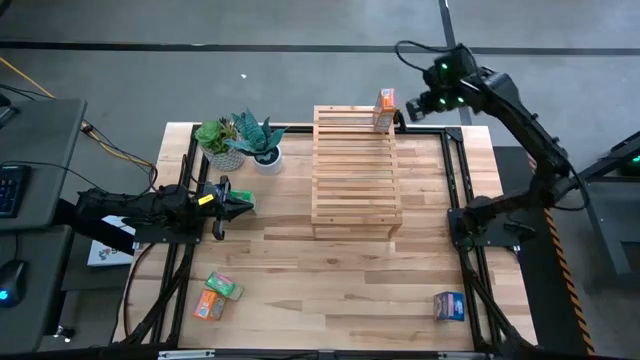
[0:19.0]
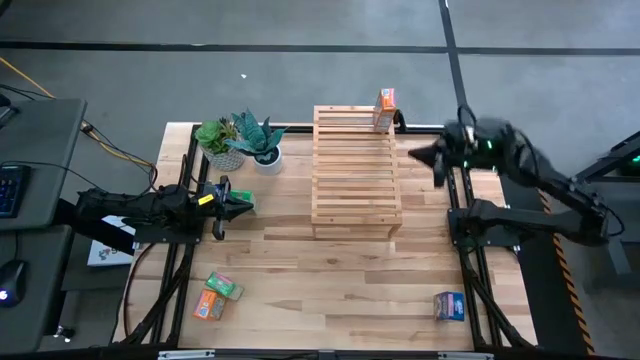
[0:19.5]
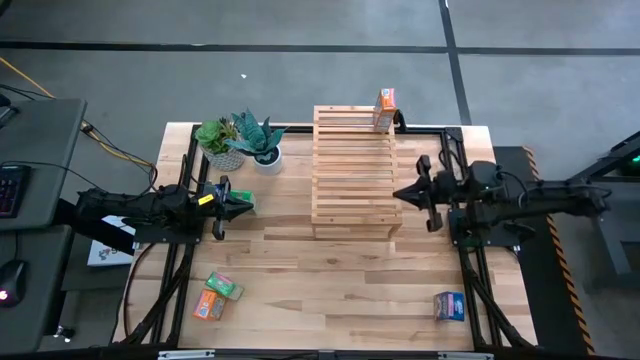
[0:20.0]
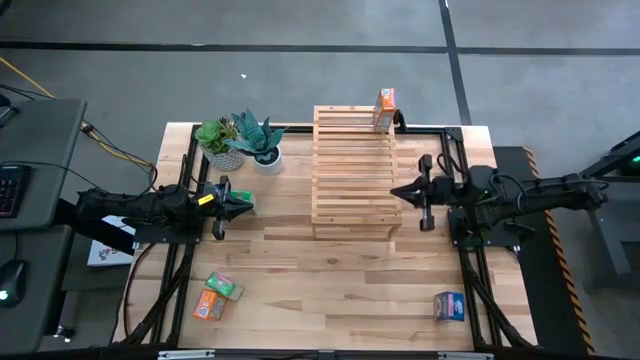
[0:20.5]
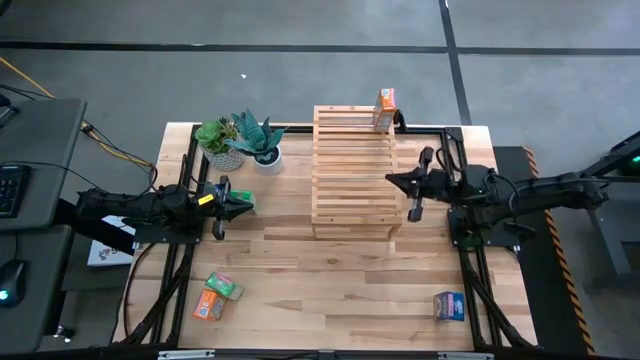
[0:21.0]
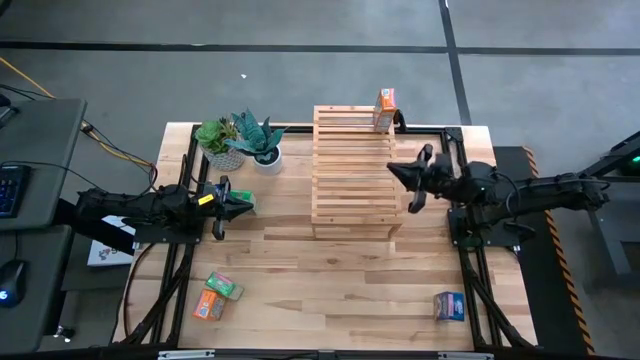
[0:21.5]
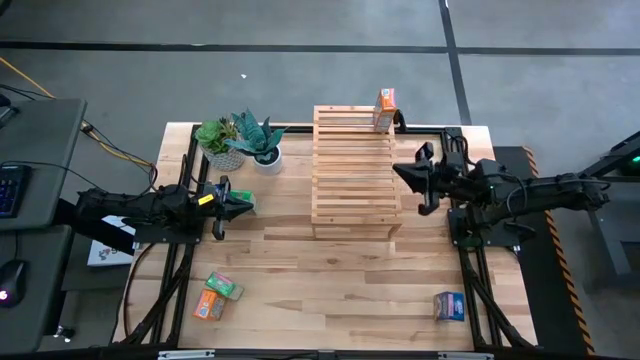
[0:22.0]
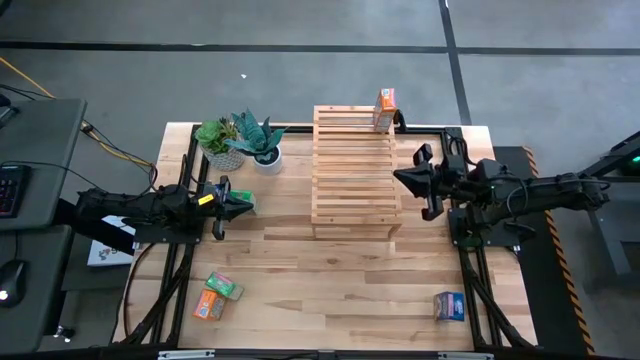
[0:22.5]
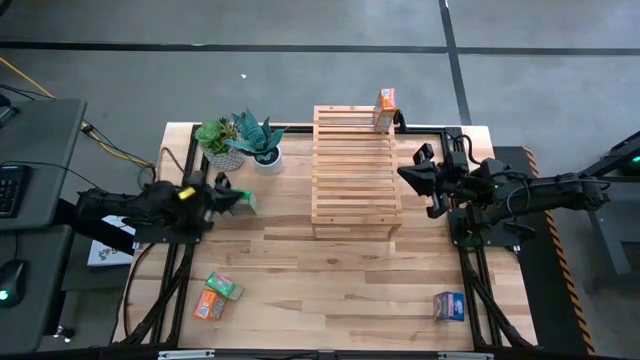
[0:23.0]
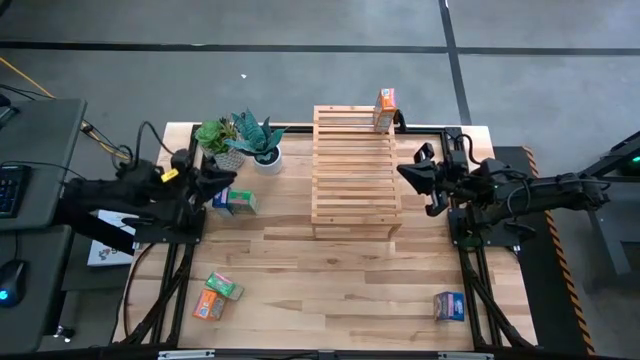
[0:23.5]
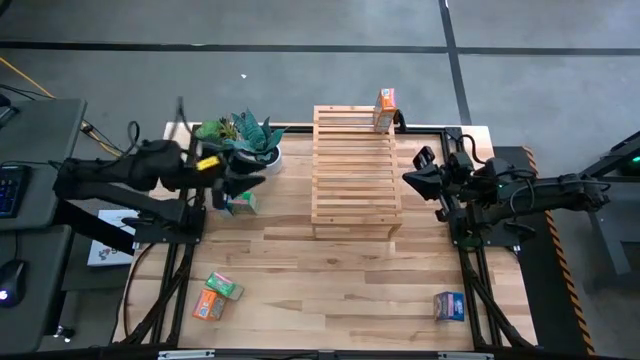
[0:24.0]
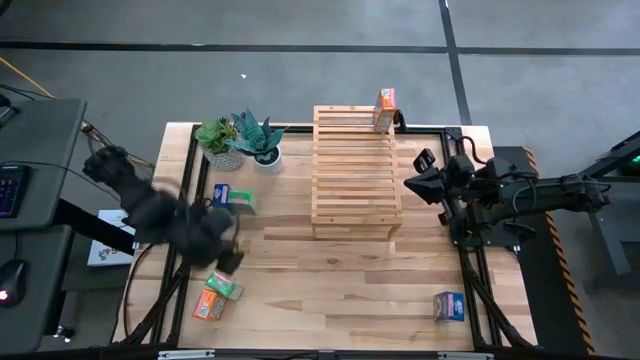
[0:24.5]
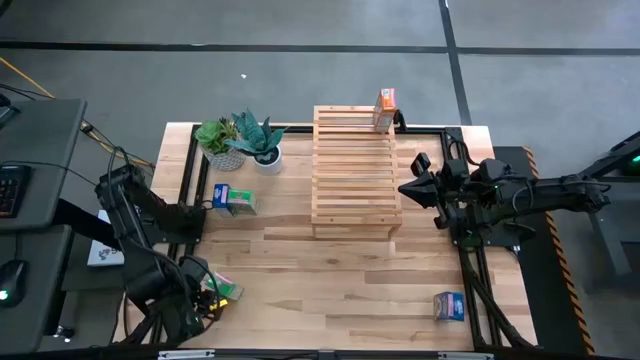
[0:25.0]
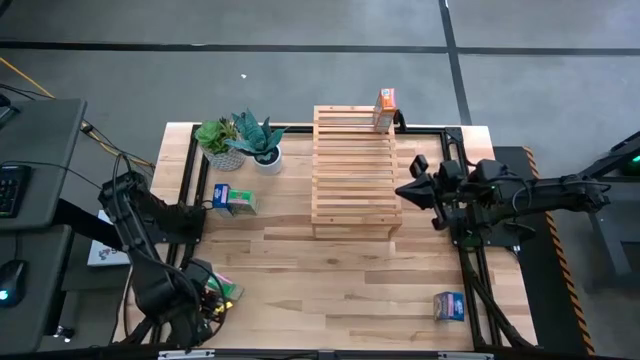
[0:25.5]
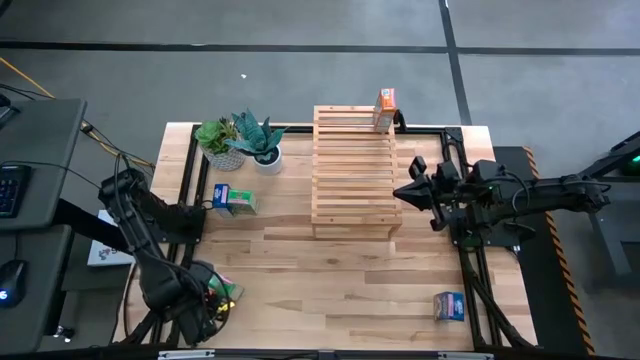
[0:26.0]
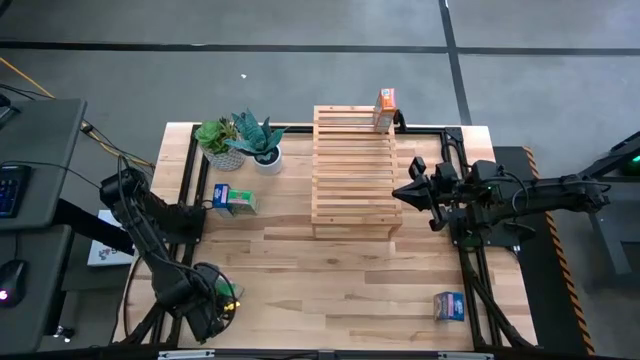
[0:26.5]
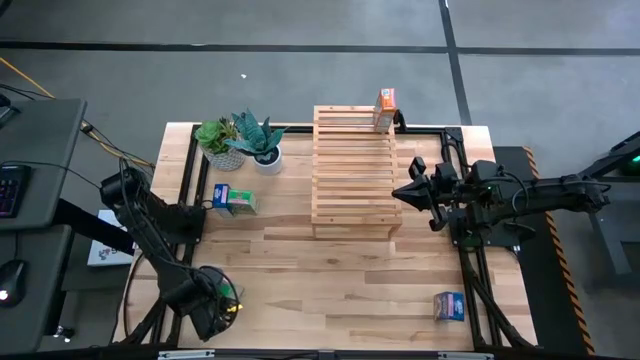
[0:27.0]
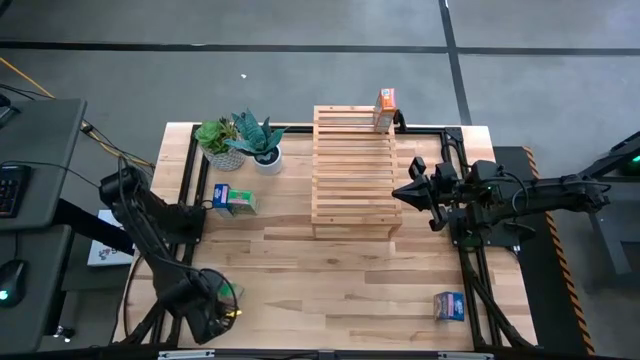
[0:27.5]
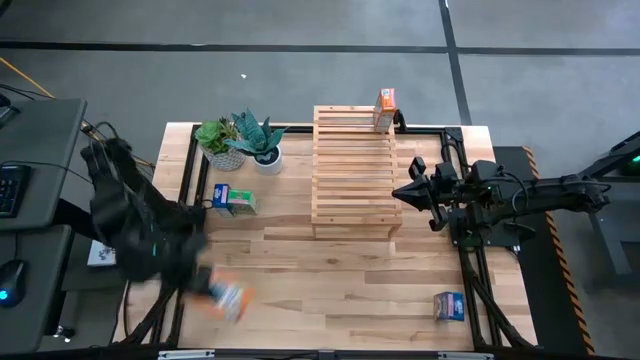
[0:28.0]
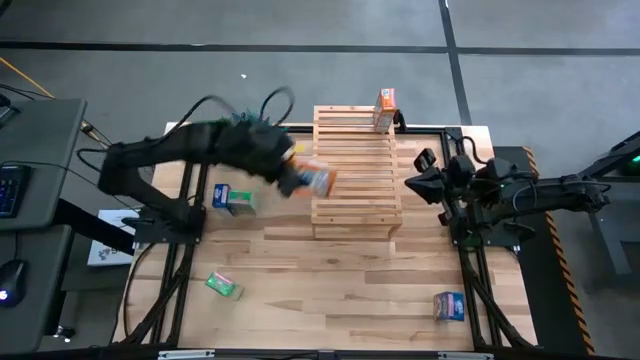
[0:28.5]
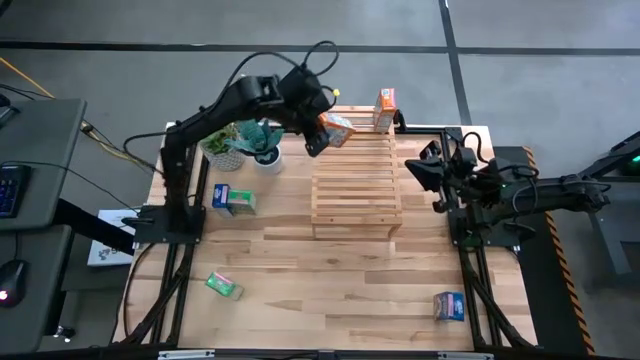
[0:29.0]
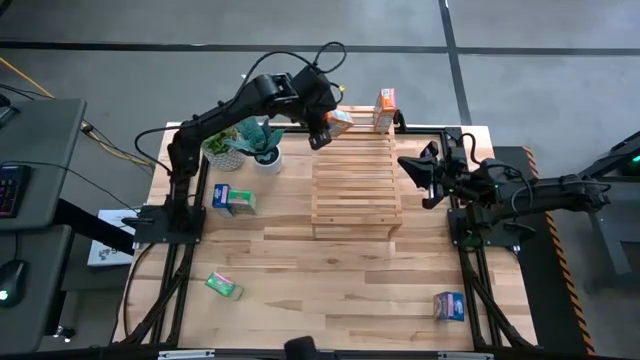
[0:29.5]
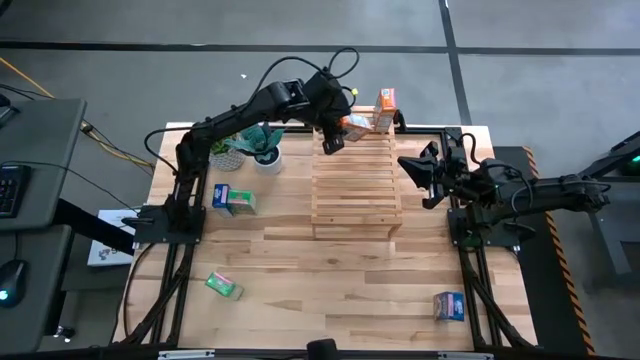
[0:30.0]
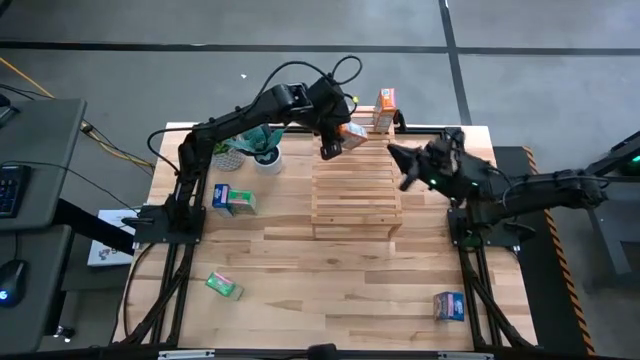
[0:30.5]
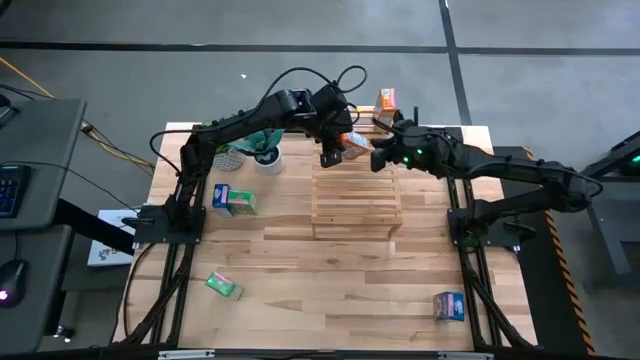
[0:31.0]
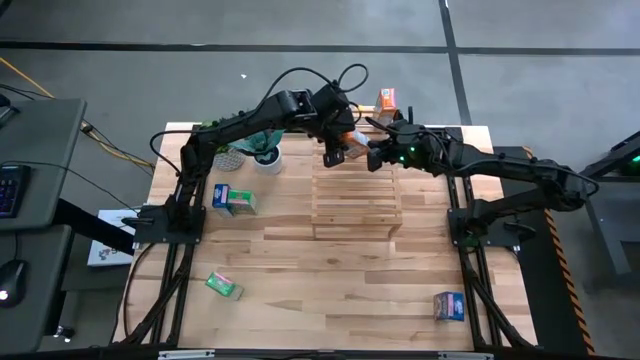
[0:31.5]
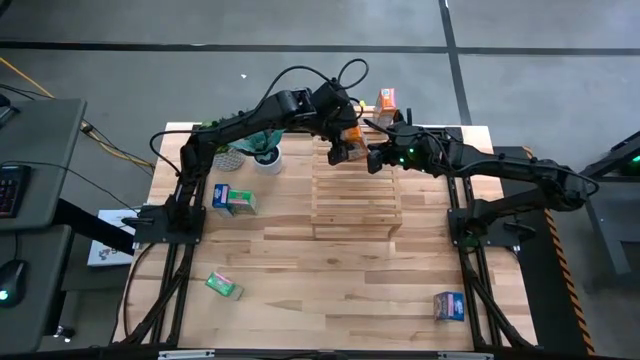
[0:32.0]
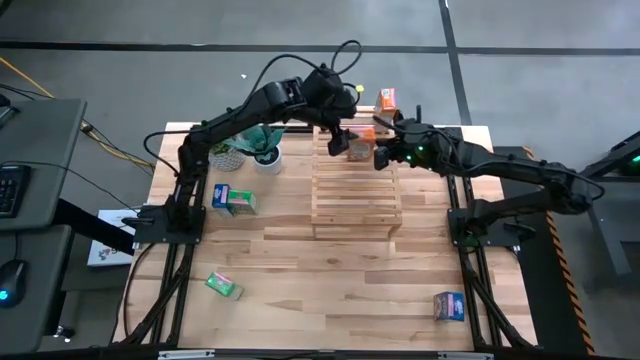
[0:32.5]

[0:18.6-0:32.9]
Task: Stack cereal on shelf
Put the bottom left orange cereal box on the shelf

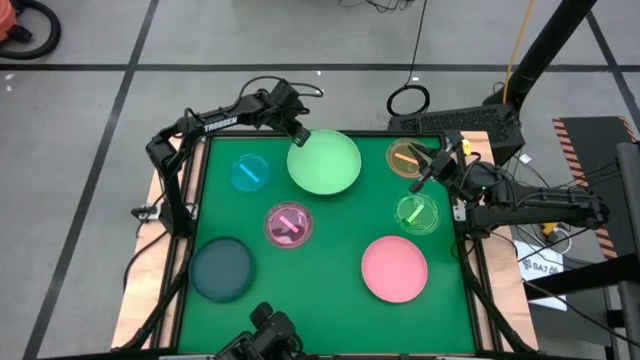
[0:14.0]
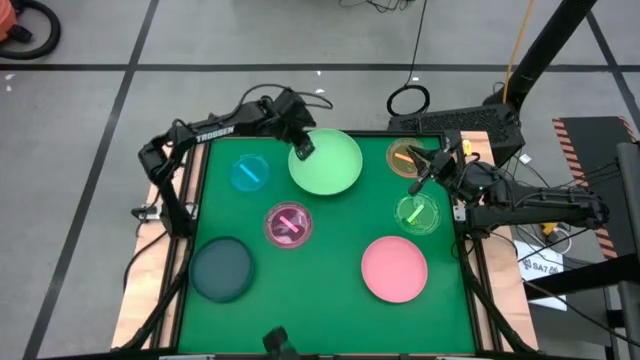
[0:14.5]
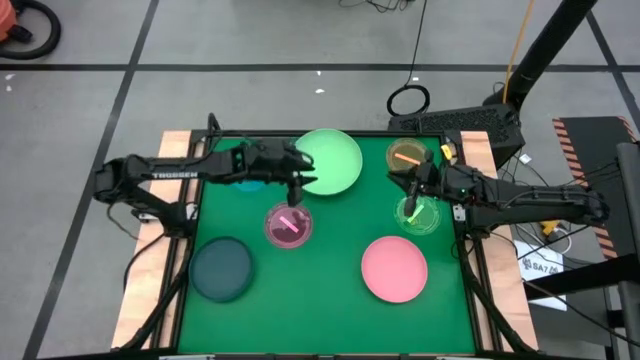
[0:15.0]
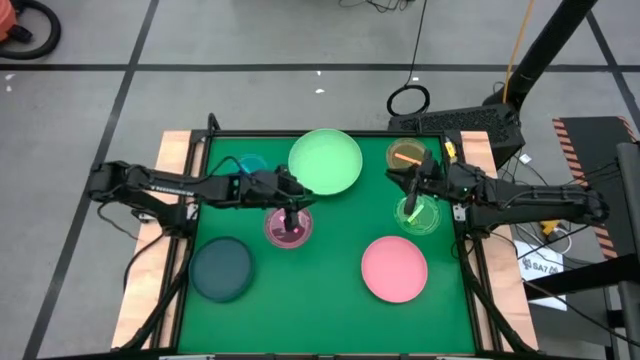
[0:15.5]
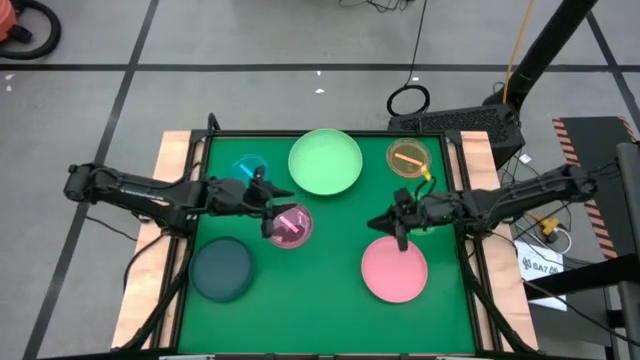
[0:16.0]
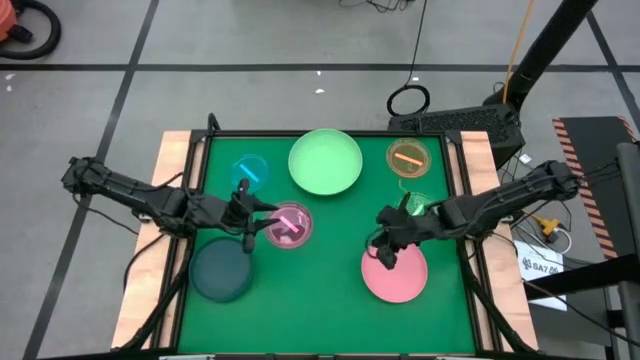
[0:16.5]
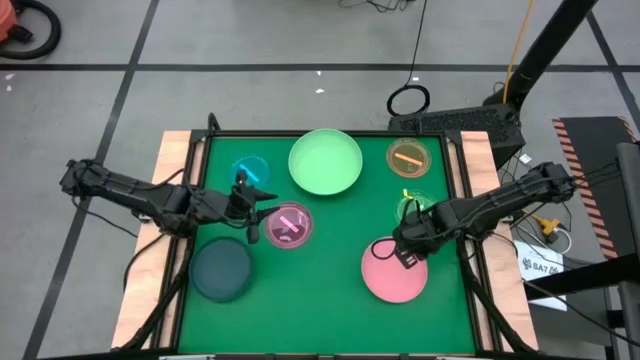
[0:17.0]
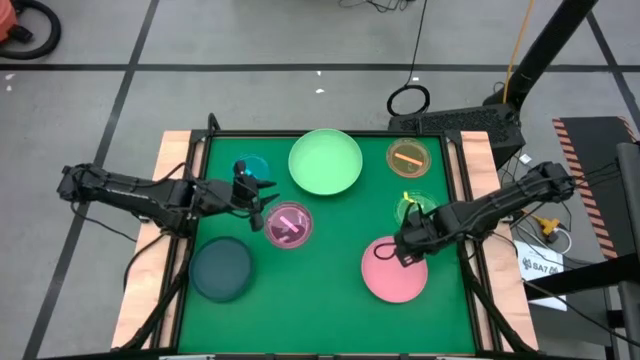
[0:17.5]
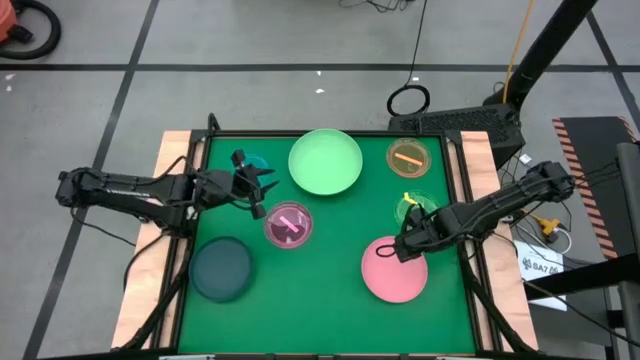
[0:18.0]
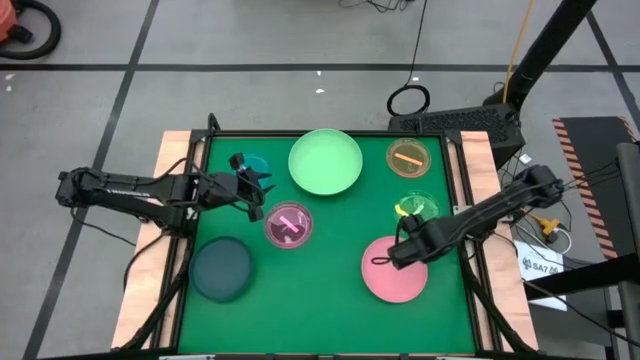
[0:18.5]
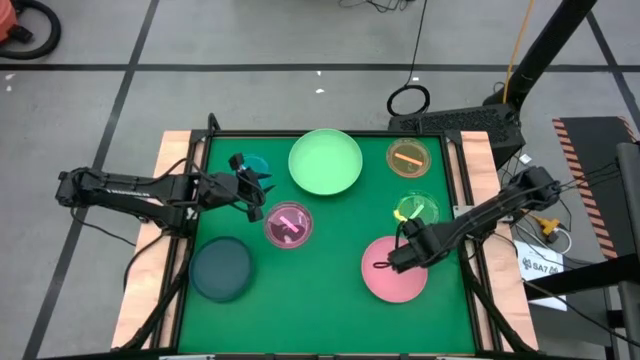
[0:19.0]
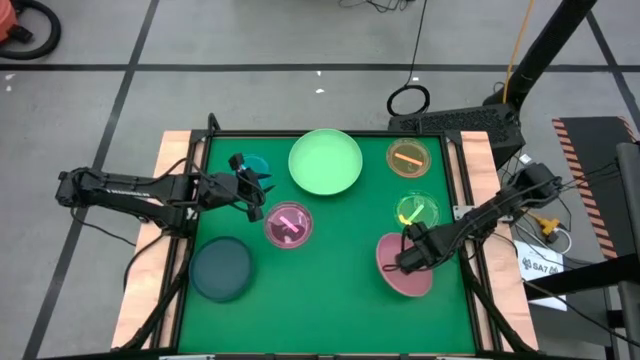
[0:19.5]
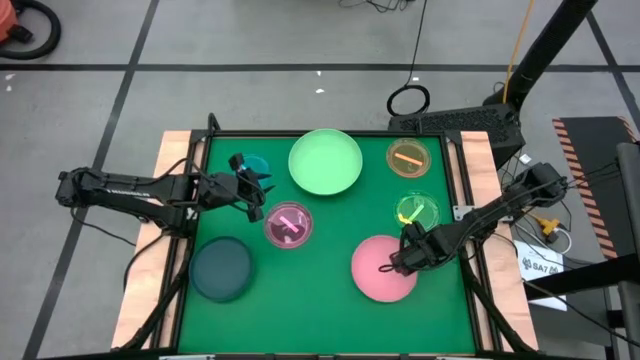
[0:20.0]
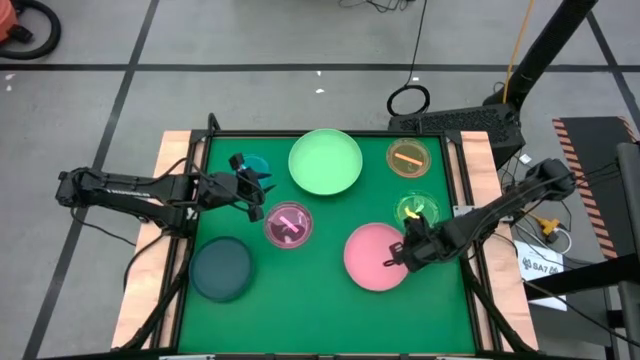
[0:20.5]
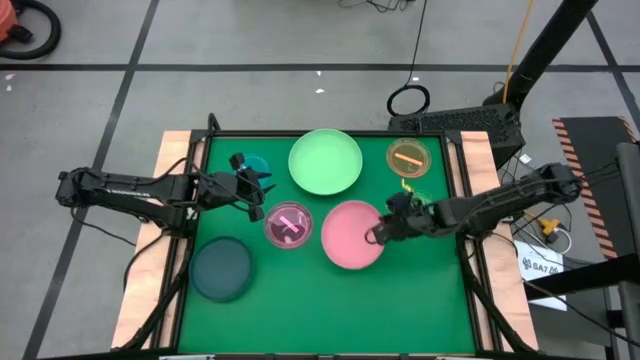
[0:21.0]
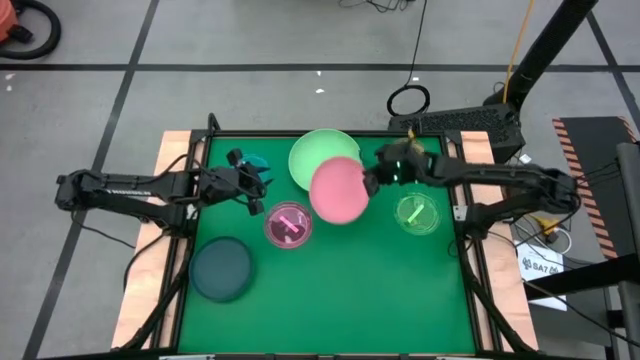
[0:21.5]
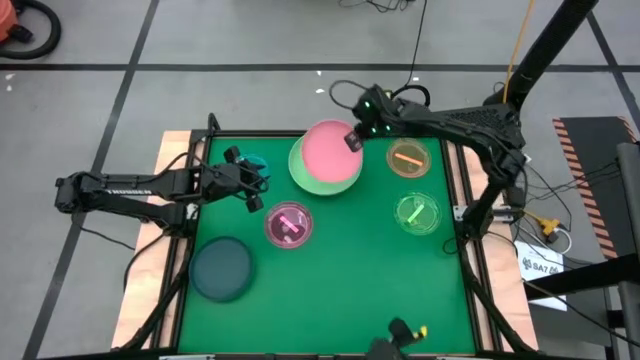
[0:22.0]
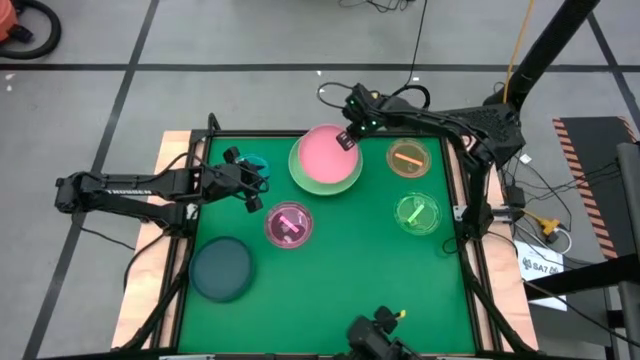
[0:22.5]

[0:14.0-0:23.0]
Task: Stack plastic plates
Stack the pink plate on top of the light green plate
